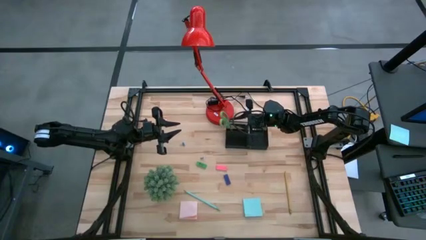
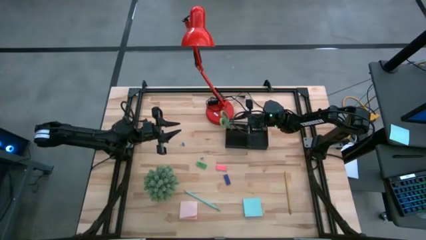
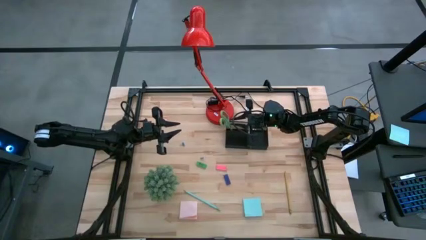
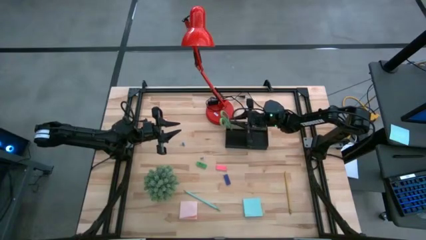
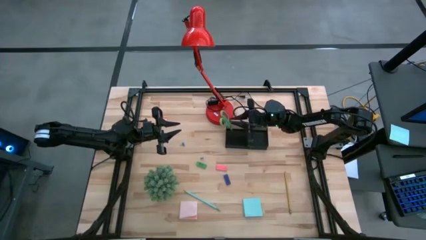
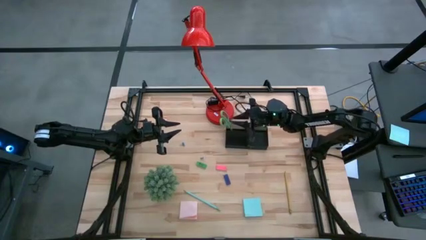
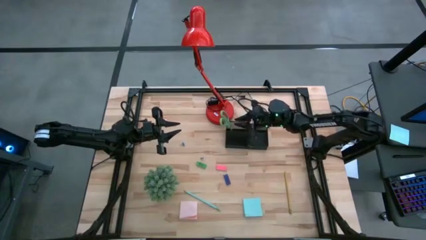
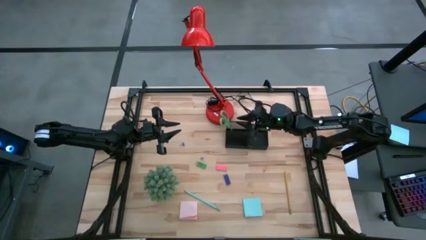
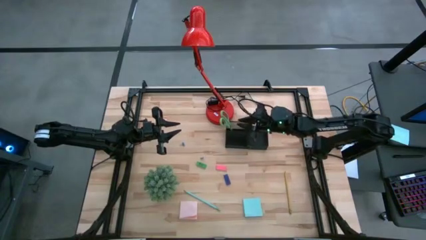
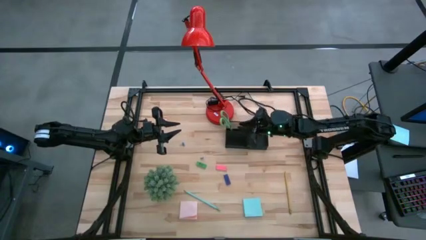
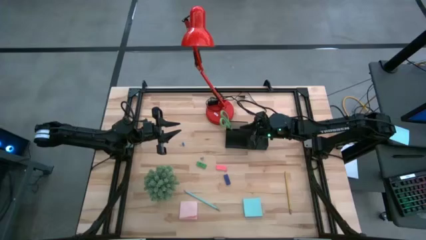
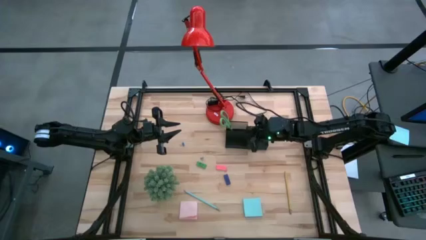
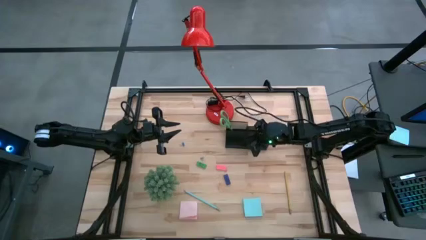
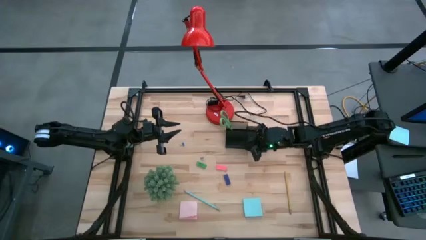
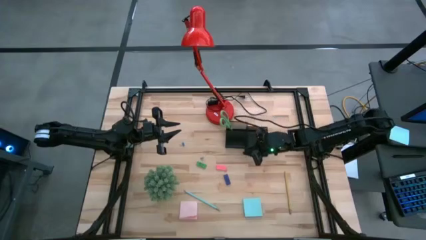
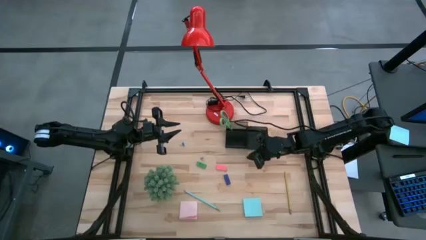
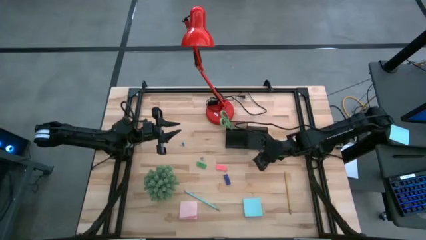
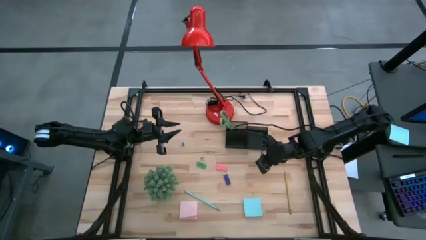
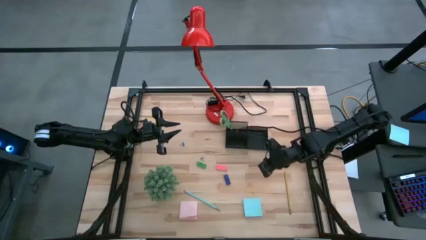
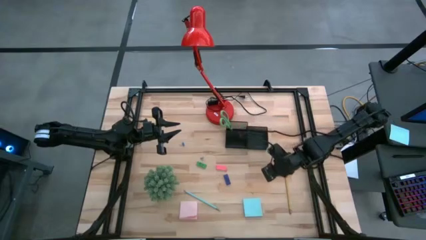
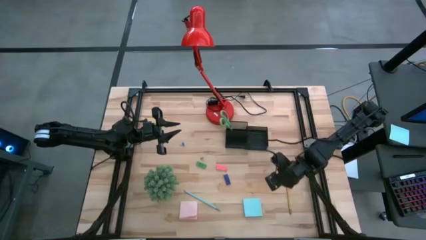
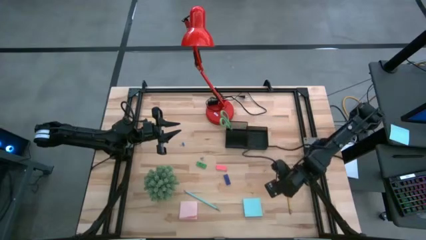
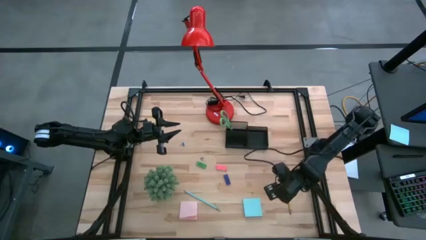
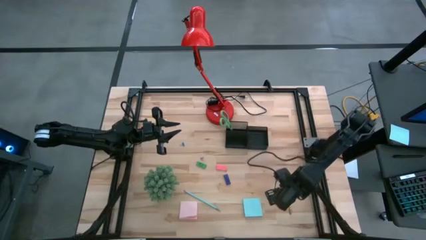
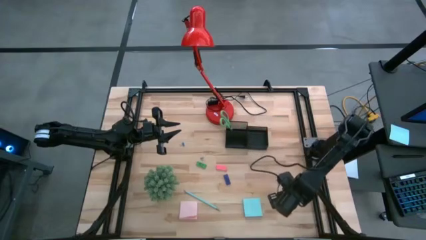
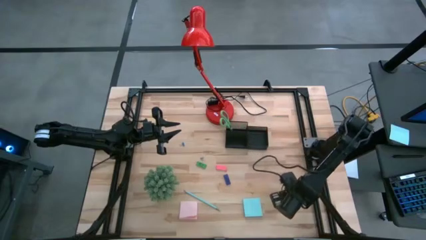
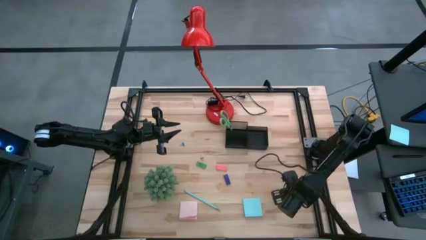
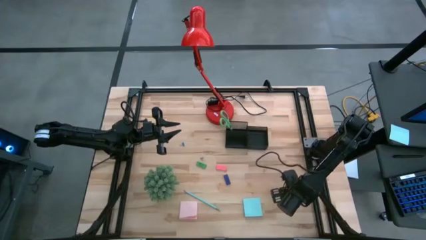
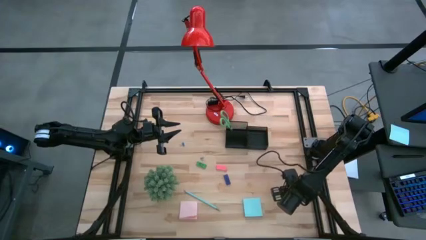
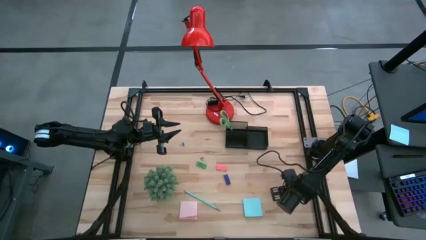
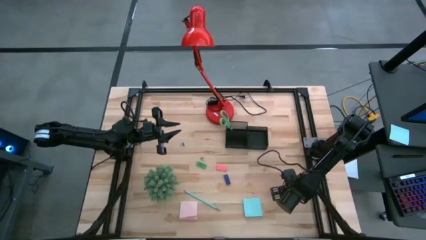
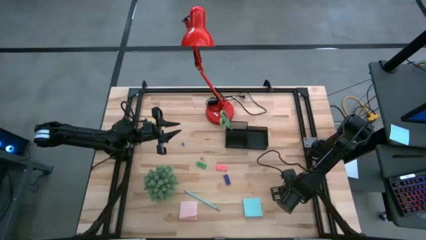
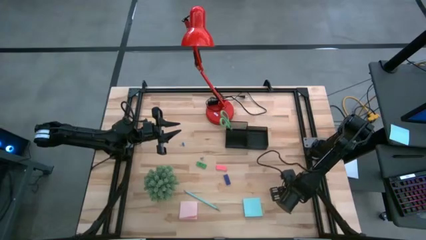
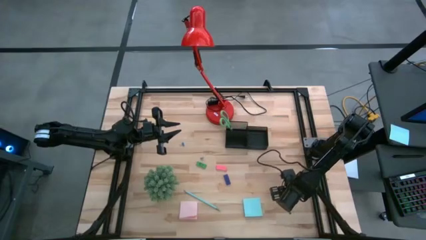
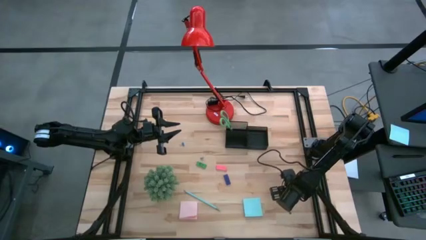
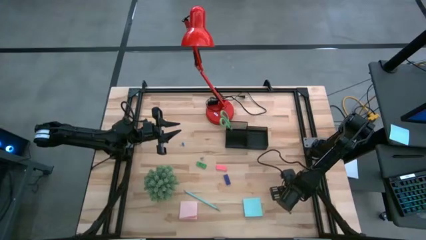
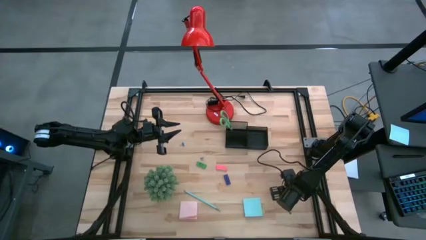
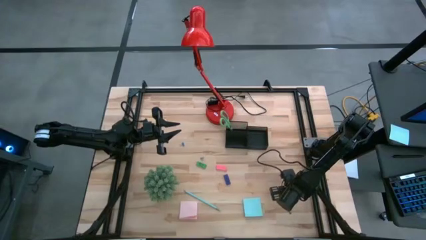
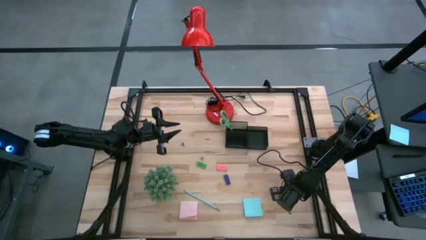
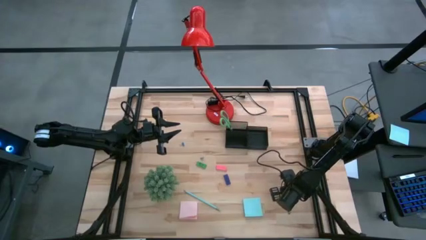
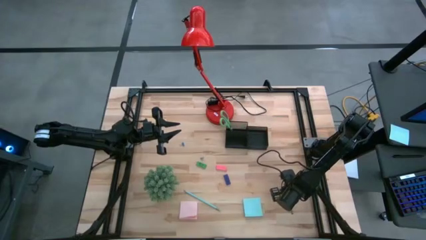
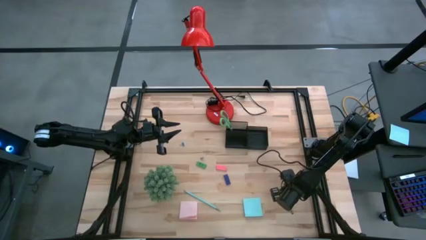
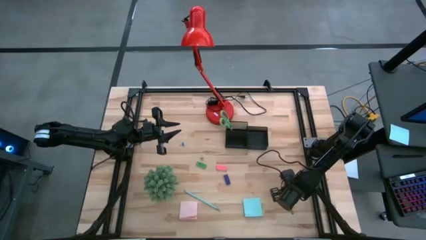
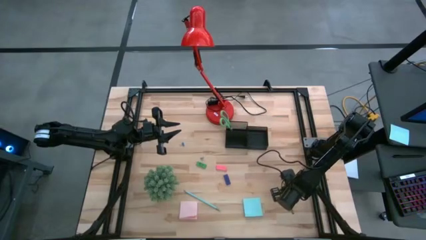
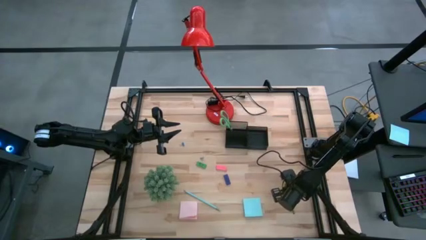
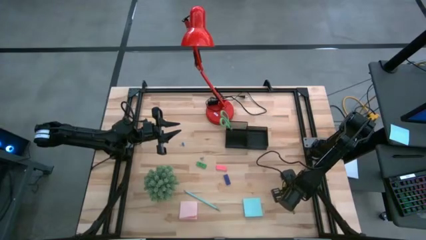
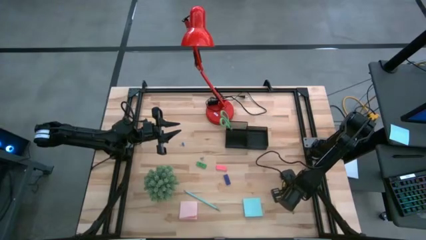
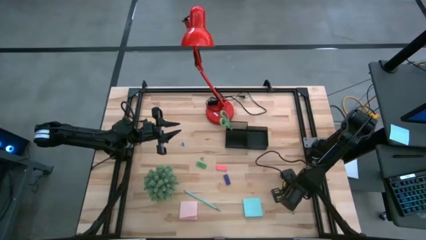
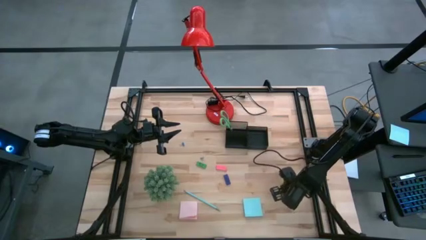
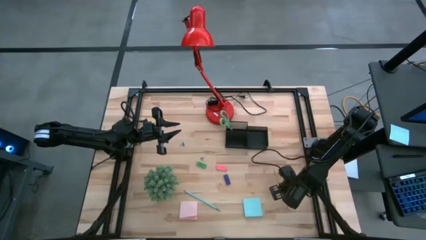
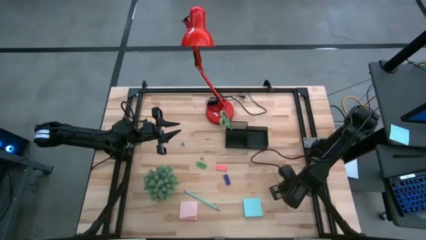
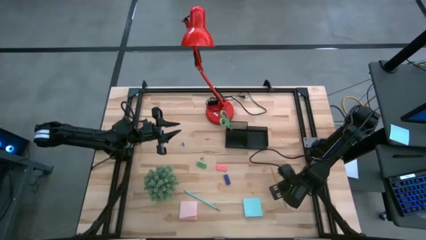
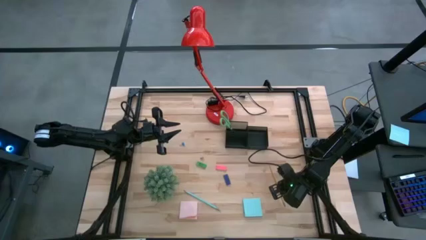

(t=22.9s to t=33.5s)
Task: Pick and place office supplies into organizer
Put the yellow pencil into the back left compartment of the desk organizer
